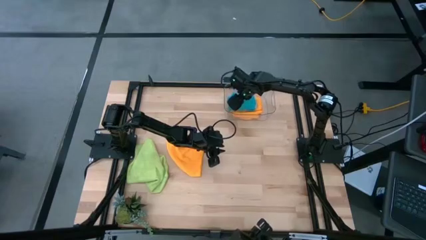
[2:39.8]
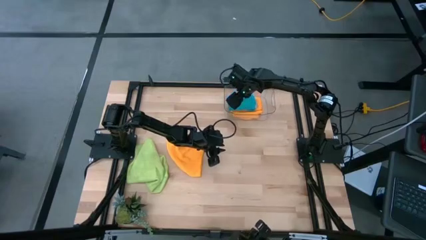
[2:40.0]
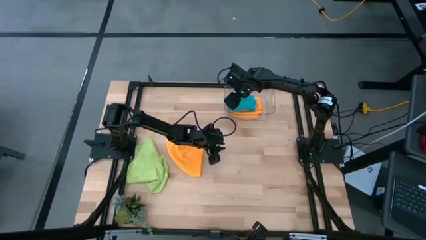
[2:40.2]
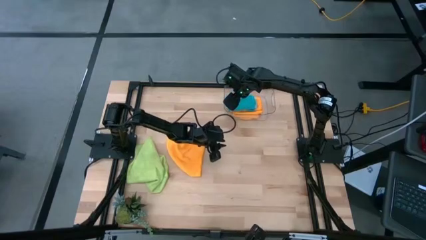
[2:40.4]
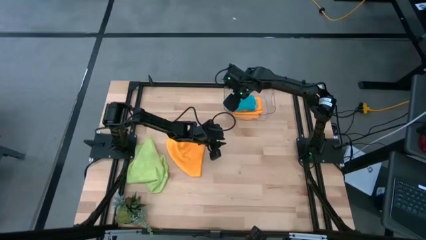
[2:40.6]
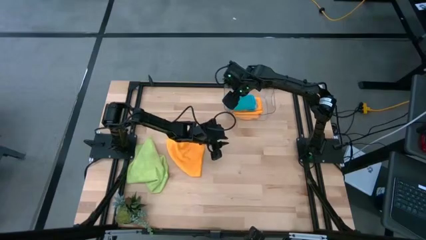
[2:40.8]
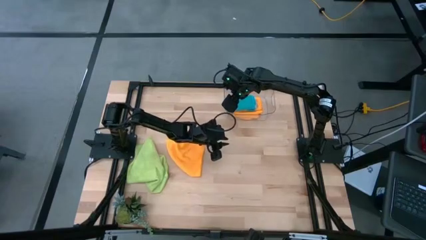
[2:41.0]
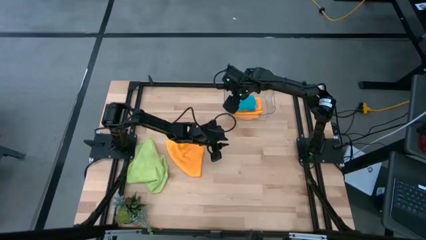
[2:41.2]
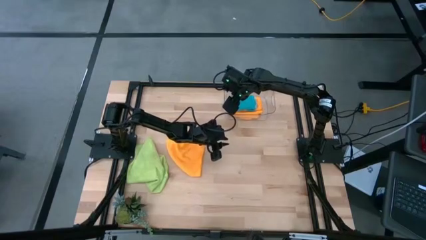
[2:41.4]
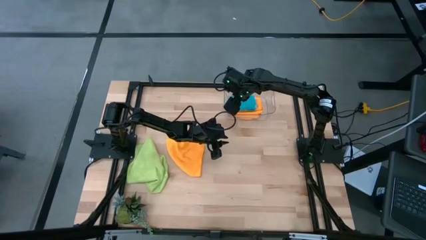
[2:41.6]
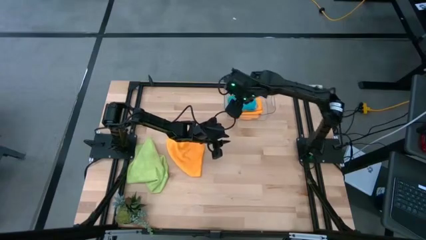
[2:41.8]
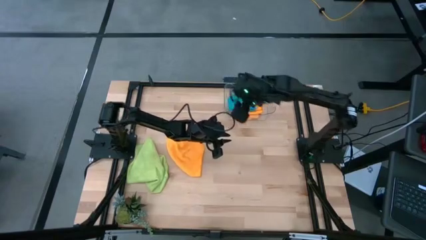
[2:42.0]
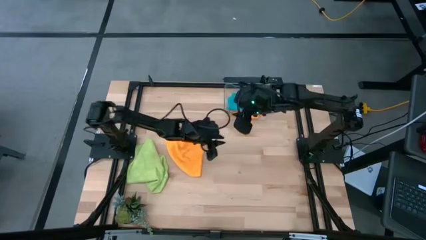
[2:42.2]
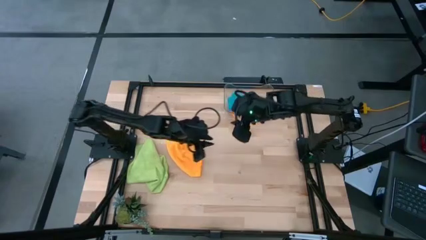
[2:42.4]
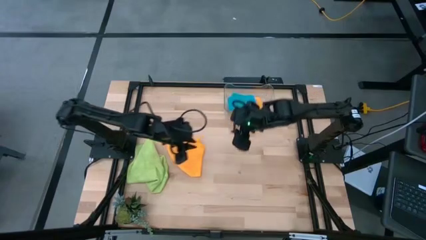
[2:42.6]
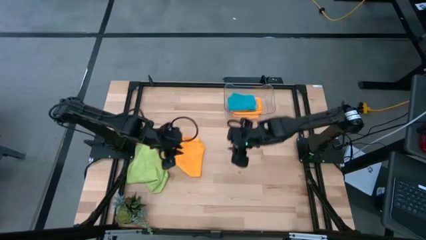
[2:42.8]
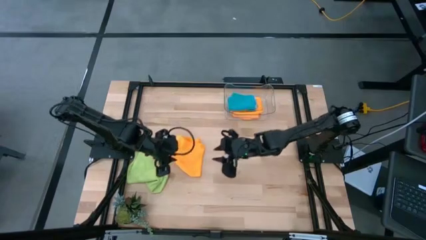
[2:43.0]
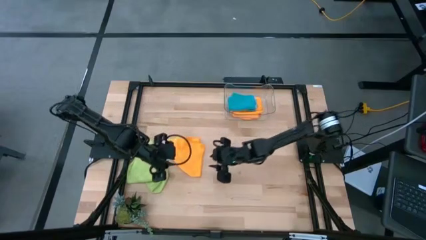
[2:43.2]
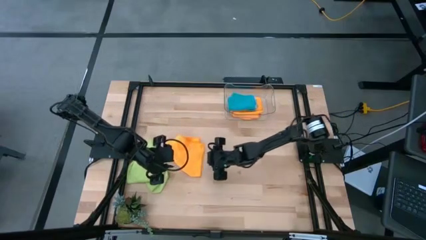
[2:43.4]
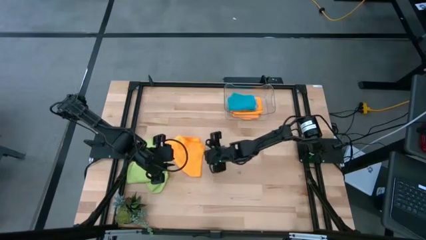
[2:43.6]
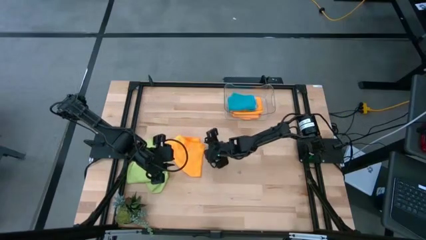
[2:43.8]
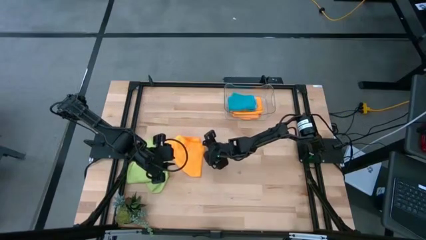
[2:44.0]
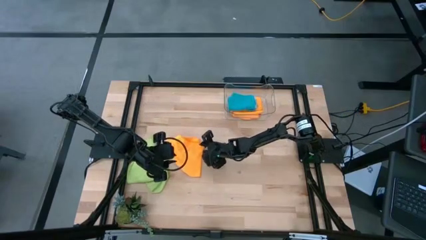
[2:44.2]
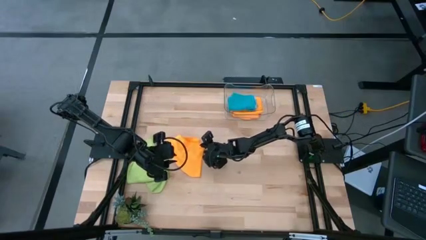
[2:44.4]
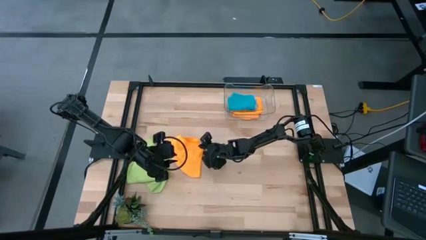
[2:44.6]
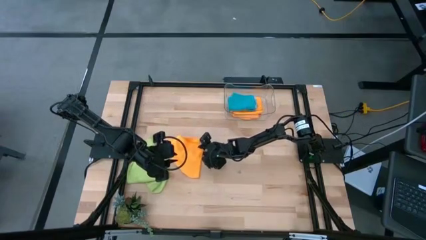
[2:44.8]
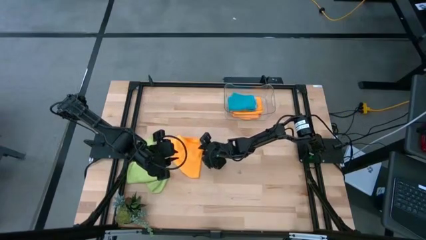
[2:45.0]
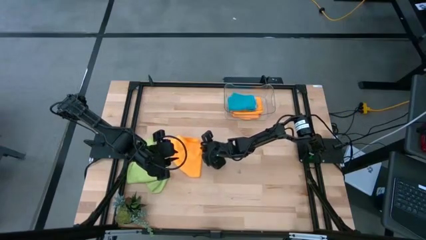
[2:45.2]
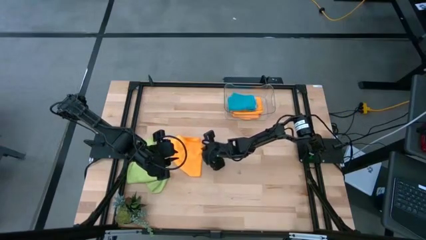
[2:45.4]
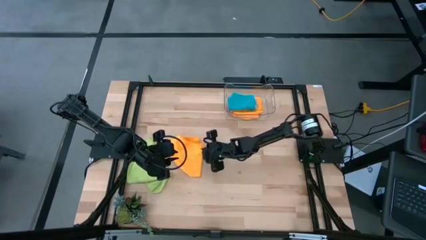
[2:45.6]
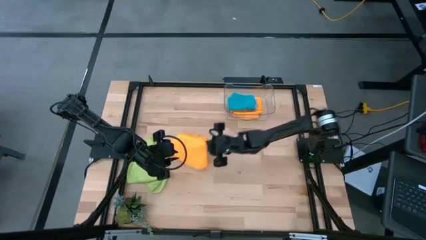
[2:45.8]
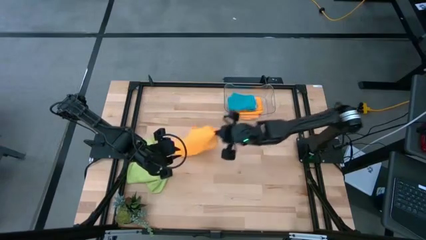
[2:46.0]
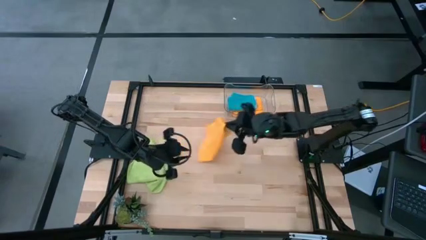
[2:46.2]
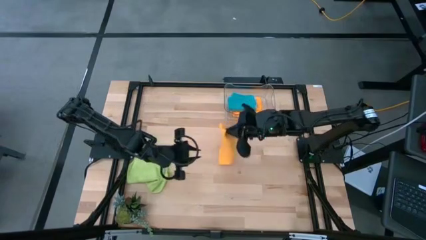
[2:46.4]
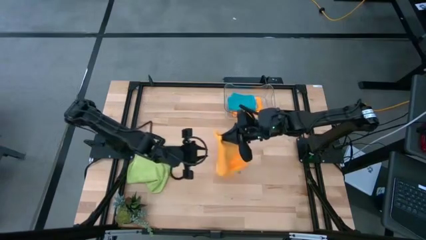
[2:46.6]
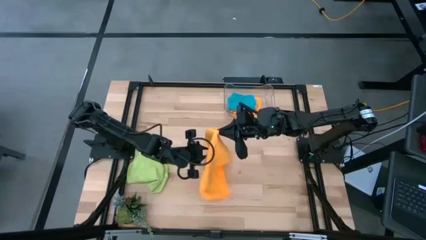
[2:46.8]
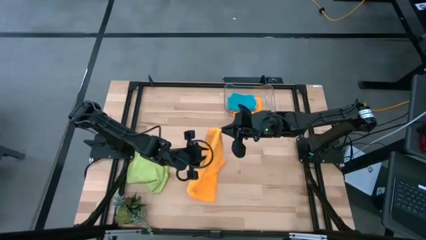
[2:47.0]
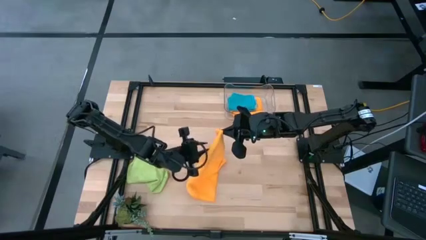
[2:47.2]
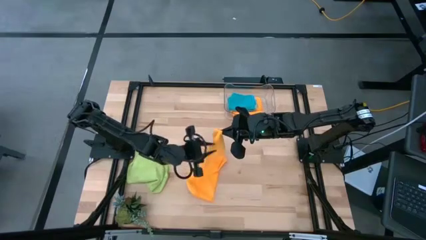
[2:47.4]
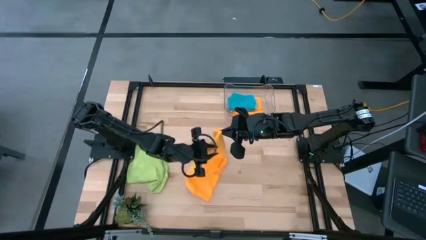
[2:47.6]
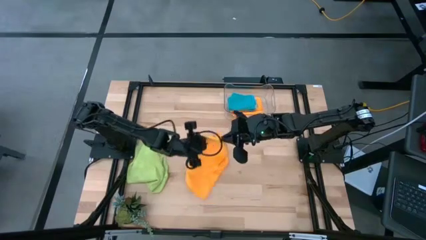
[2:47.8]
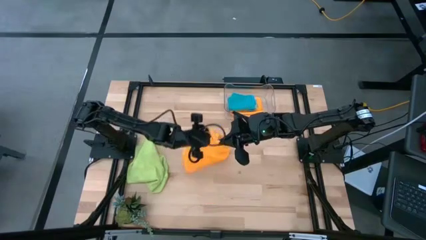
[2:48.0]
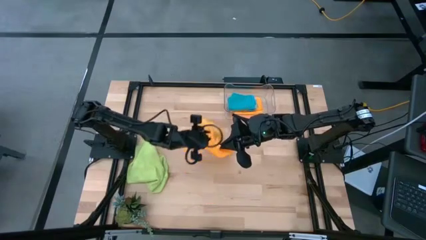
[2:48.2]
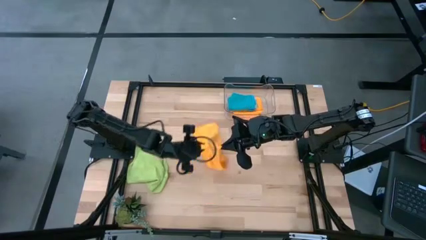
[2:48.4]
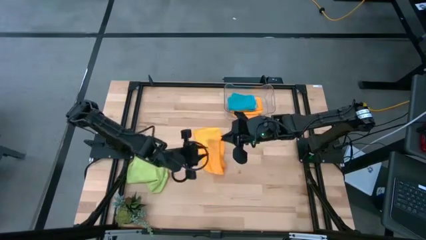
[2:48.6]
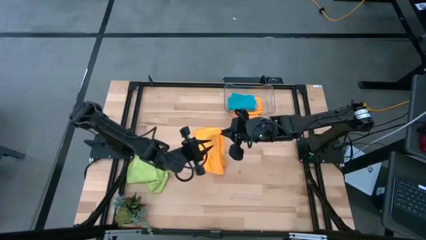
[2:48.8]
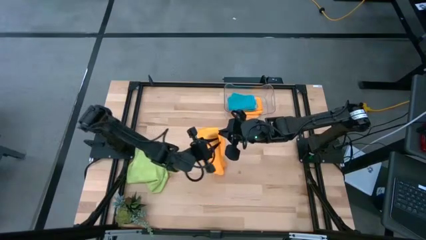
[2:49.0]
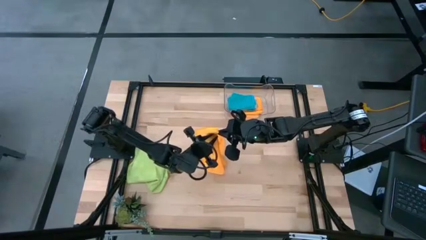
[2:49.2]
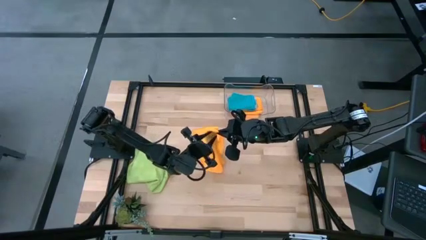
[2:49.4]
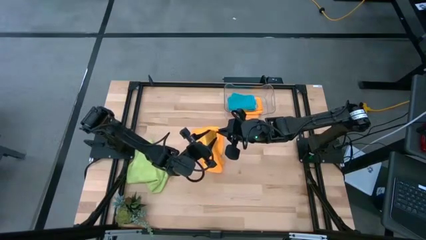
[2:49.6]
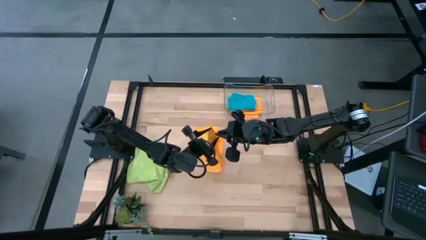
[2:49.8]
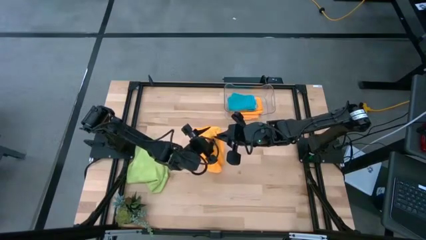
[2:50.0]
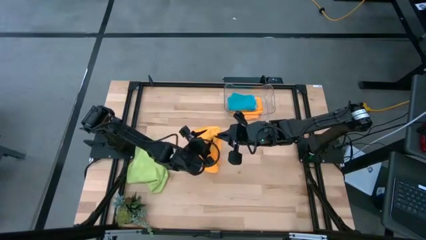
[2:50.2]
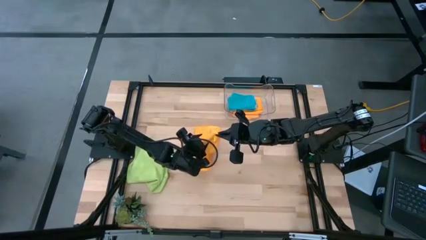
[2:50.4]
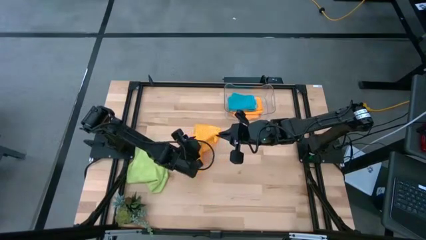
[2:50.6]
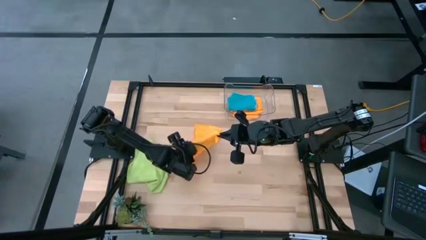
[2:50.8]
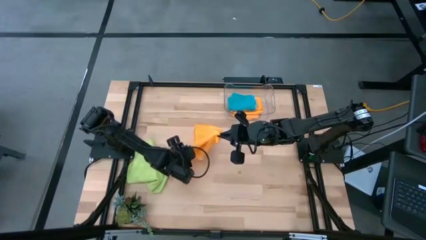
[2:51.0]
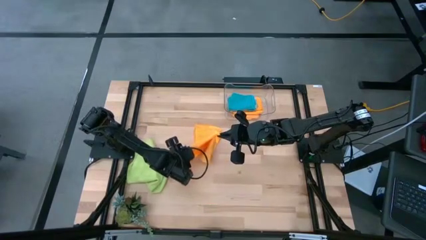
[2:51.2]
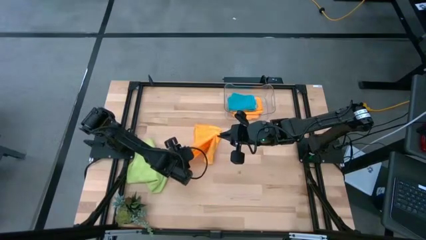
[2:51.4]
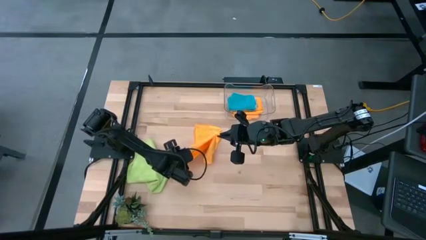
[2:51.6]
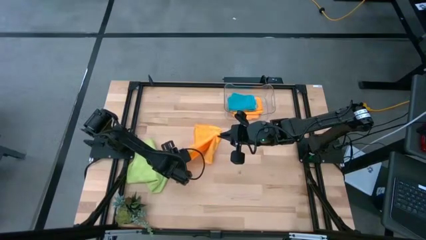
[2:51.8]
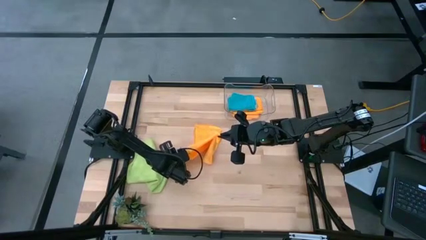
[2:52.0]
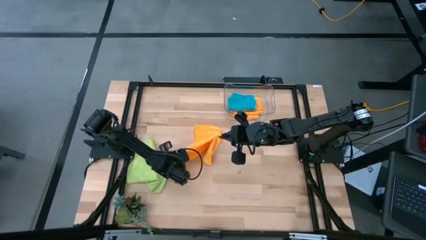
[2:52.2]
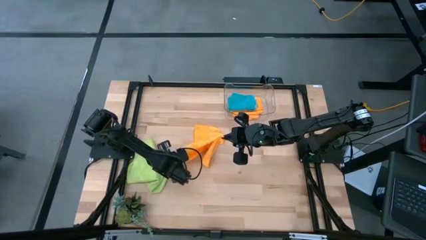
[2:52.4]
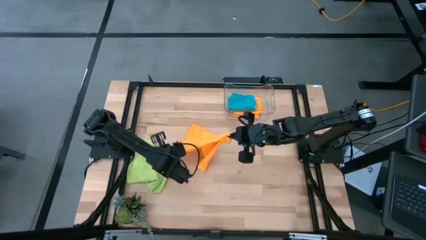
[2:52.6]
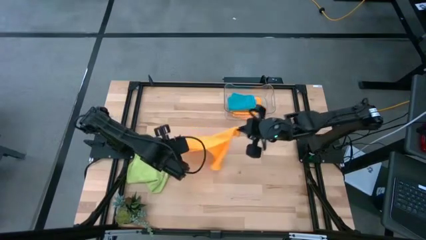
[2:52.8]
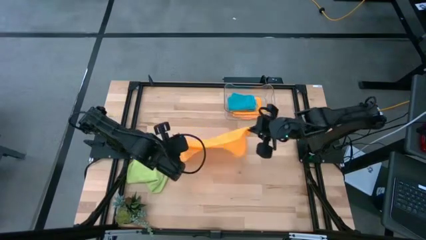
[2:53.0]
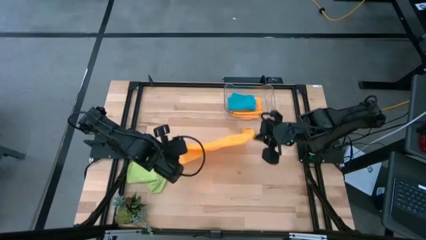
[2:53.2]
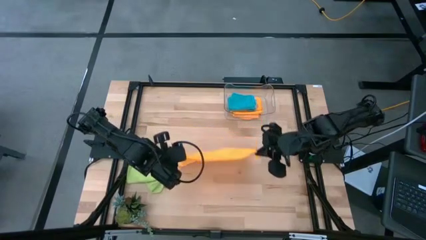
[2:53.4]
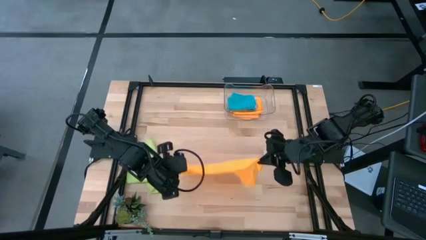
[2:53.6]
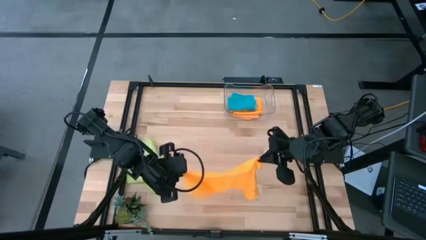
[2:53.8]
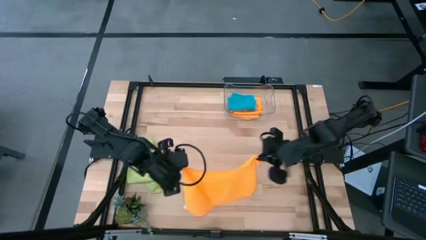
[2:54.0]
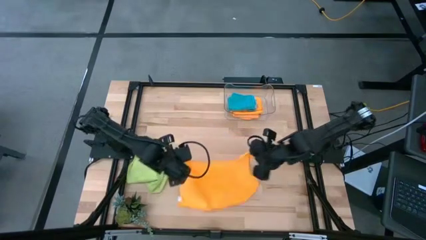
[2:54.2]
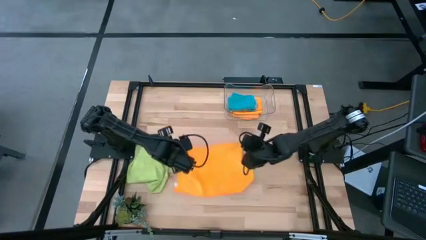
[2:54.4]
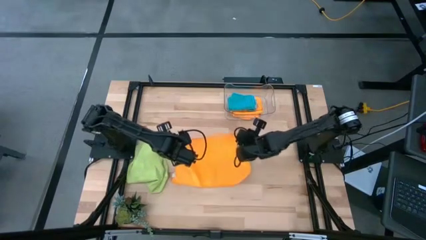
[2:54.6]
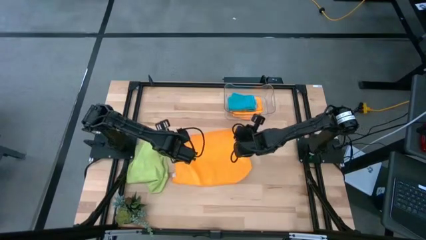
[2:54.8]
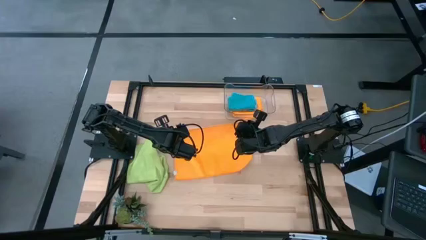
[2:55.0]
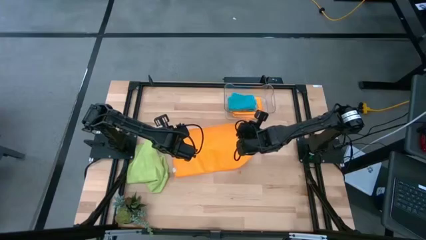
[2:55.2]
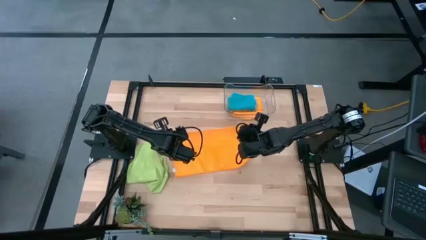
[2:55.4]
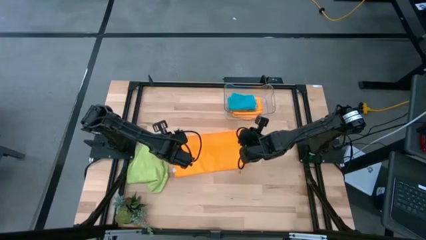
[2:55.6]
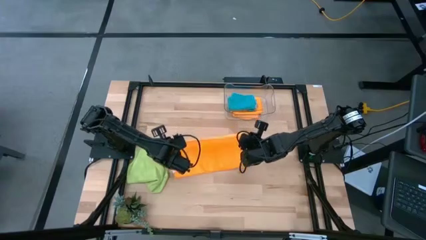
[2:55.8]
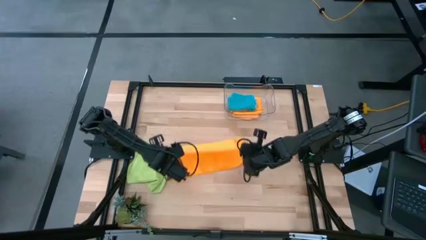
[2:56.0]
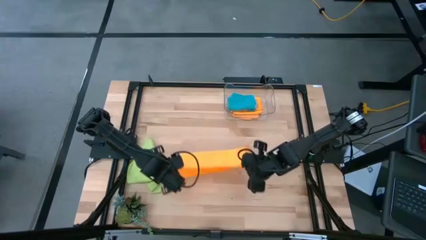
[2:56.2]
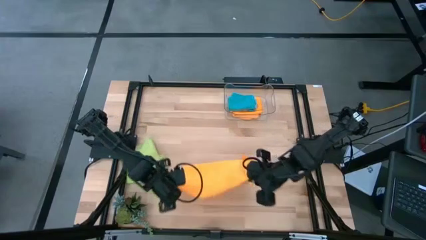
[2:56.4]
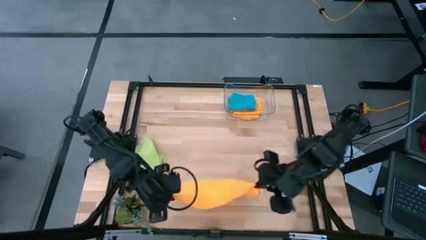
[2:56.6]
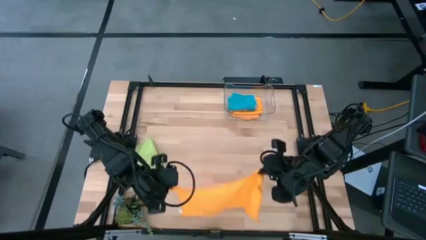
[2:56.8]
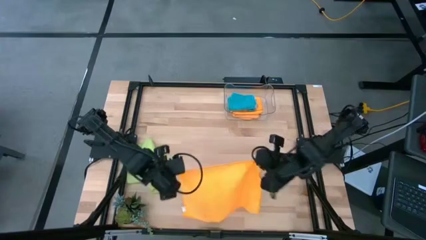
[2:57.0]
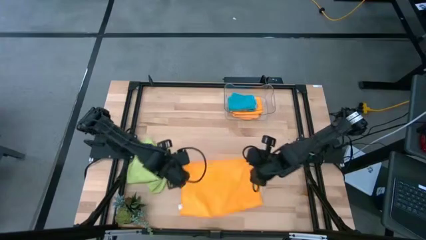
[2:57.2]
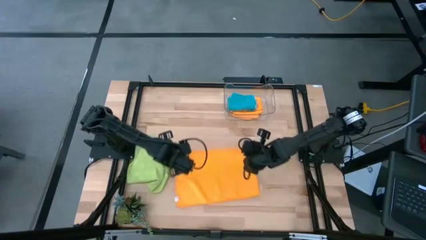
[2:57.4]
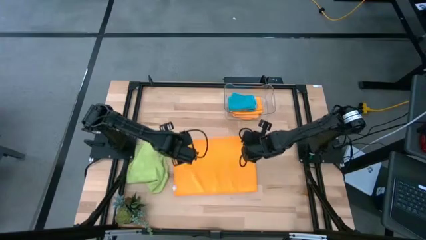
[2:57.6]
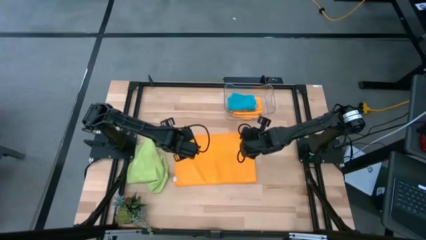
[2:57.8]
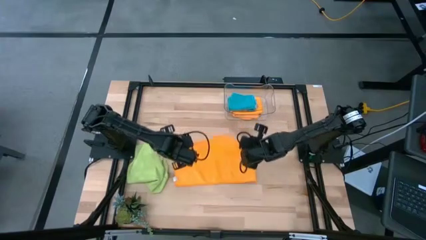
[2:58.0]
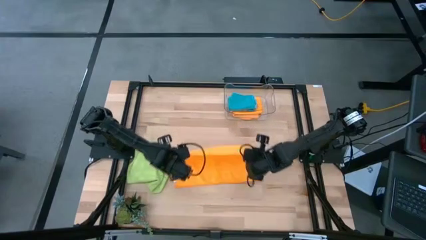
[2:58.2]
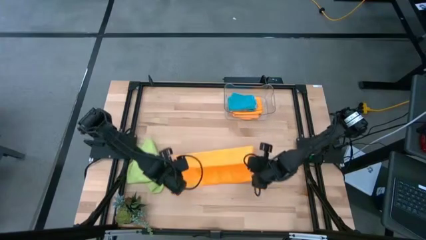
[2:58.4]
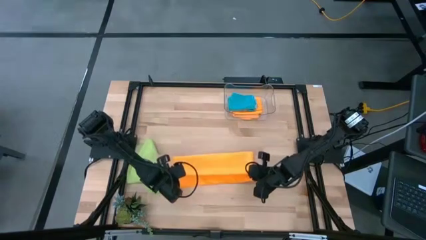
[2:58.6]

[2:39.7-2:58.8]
Task: Fold microfiber towels
Fold the orange microfiber towel
